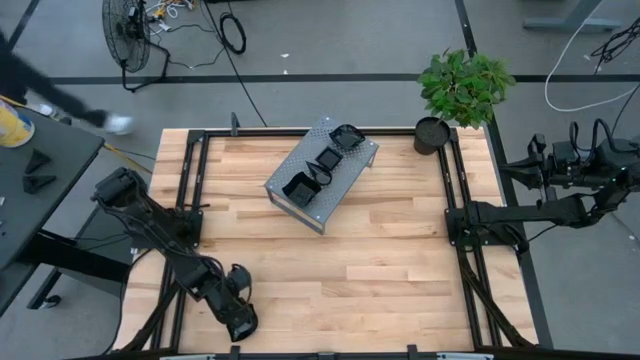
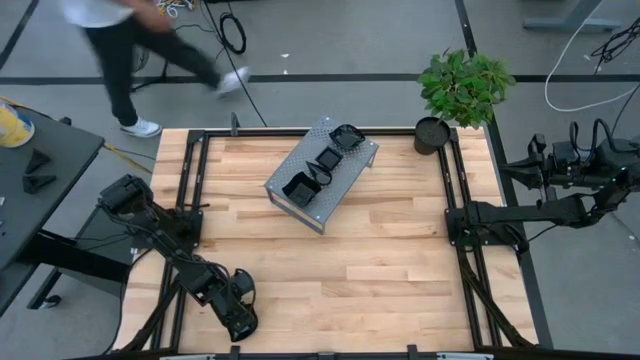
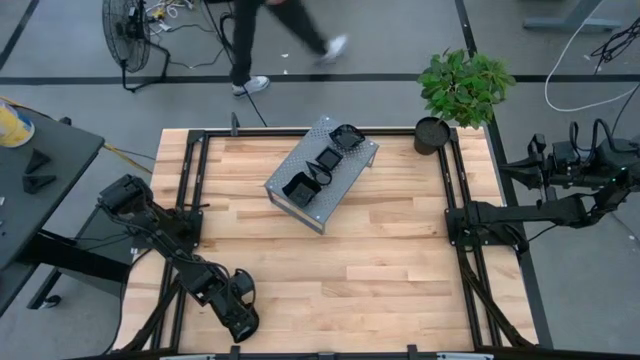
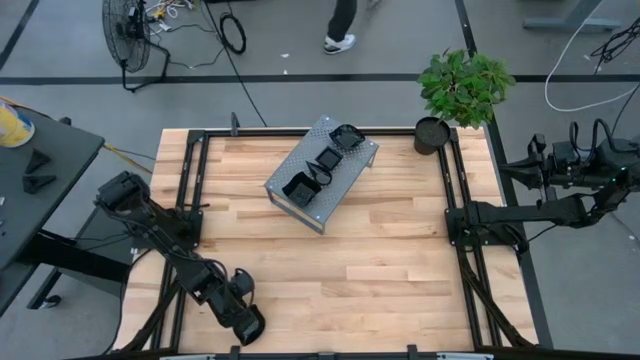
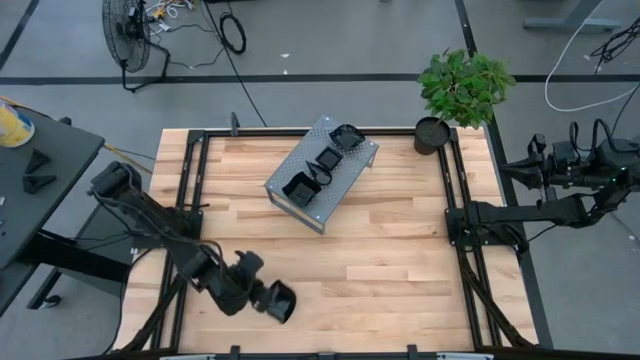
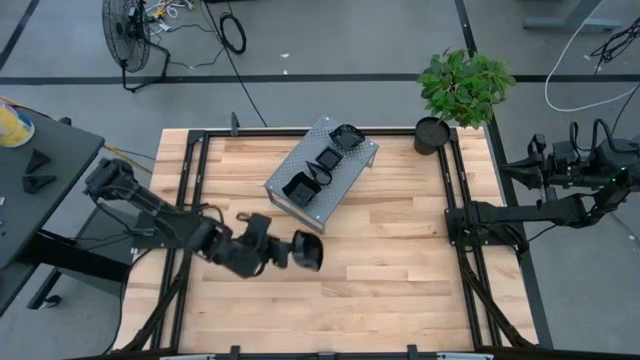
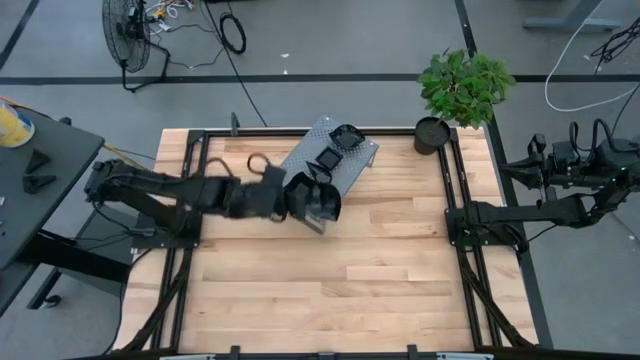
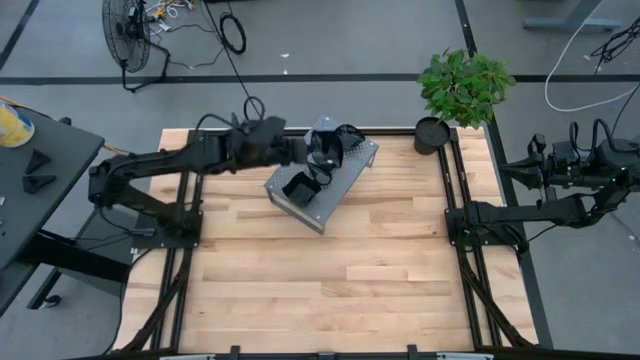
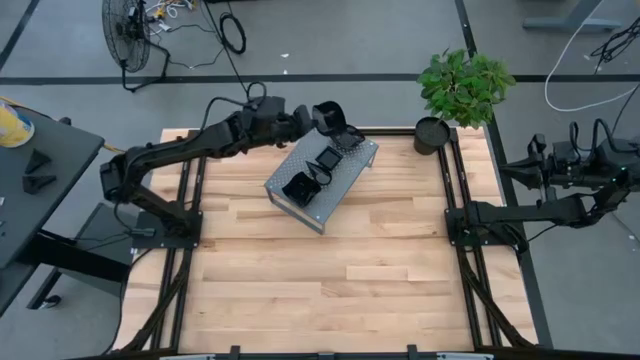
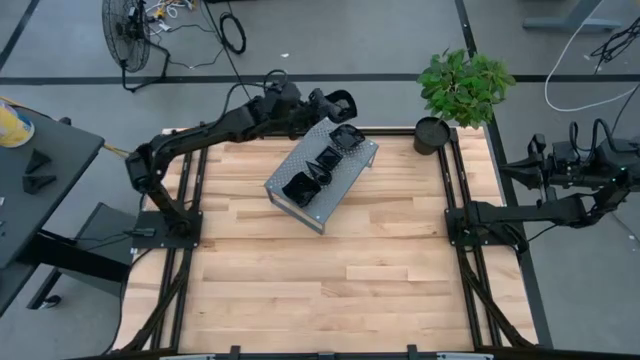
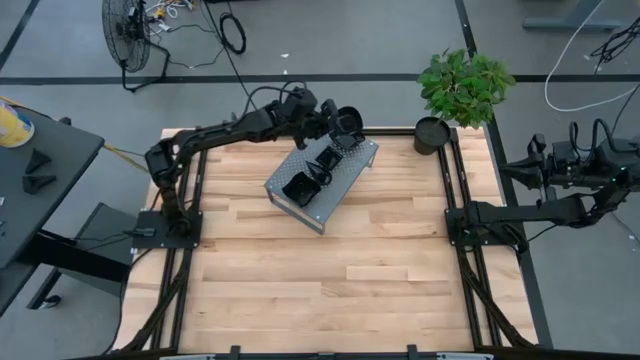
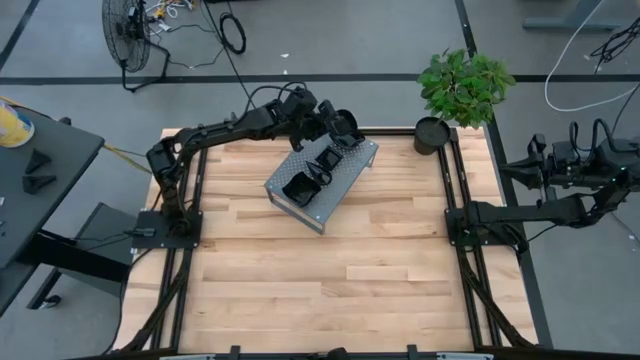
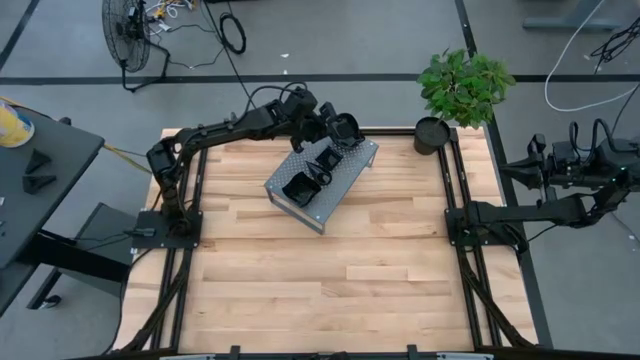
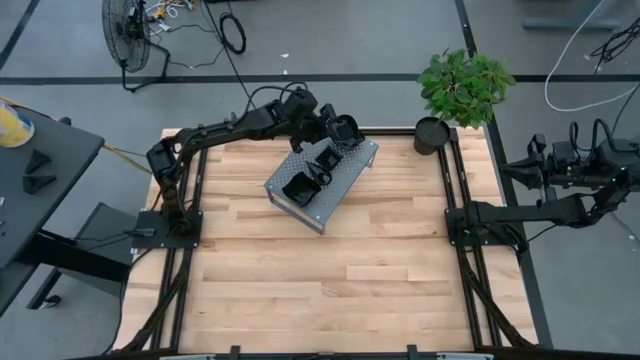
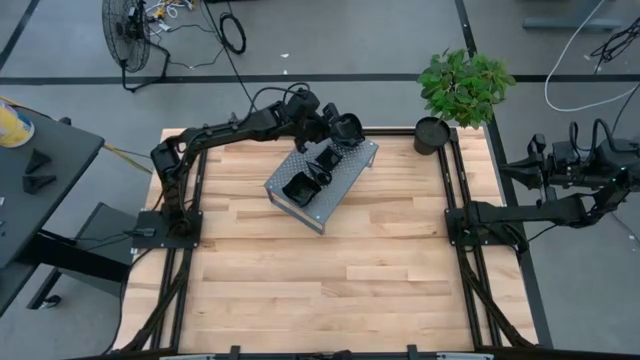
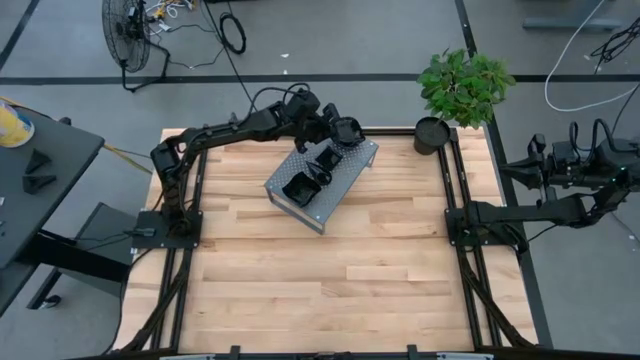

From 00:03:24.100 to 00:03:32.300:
Task: Pick & Place Mini shaped plates
Stack the black leaf shaped plate on top of the black leaf shaped plate on the shelf

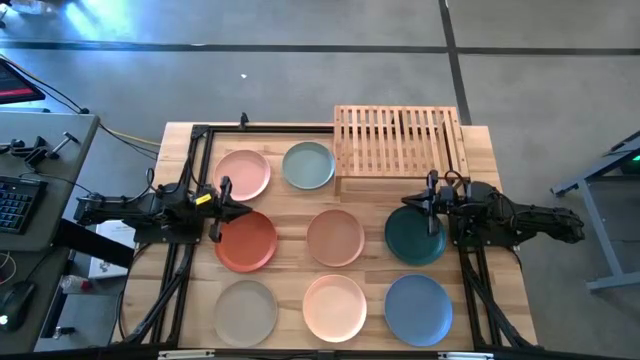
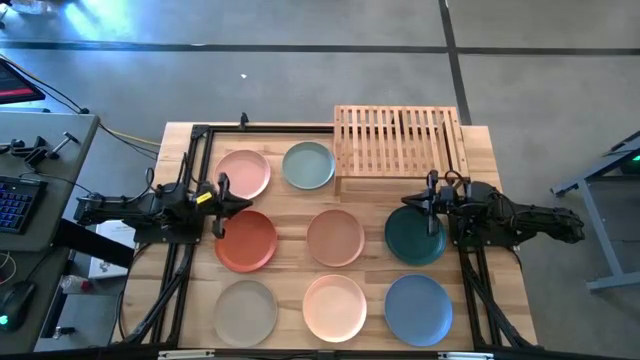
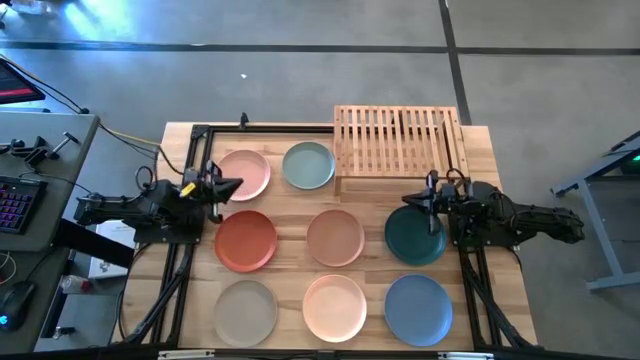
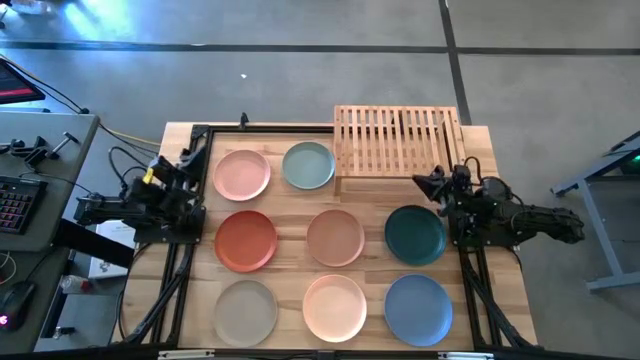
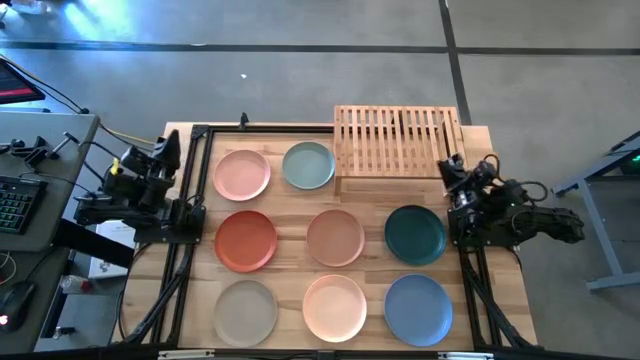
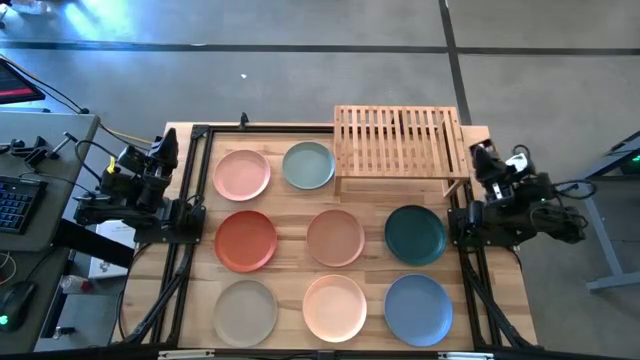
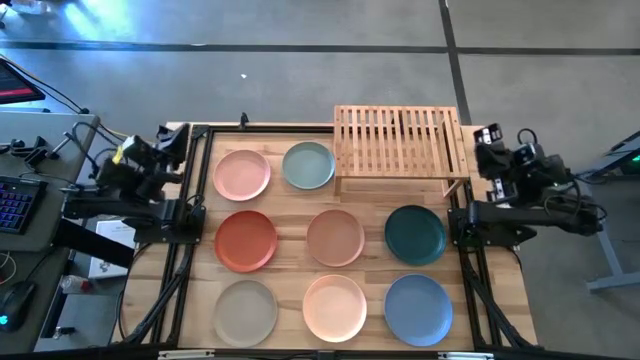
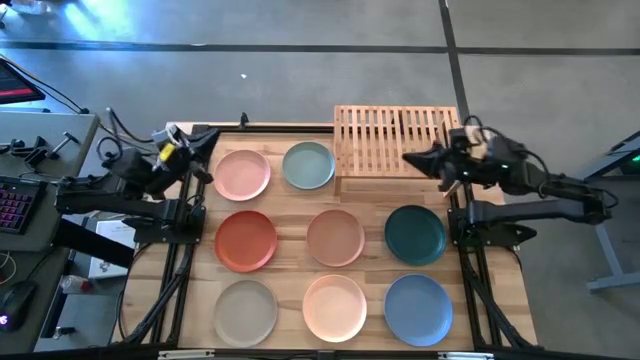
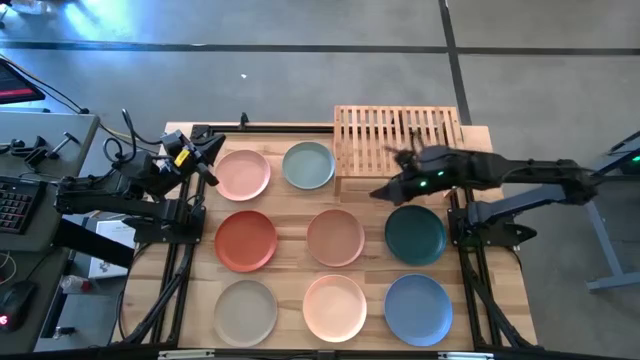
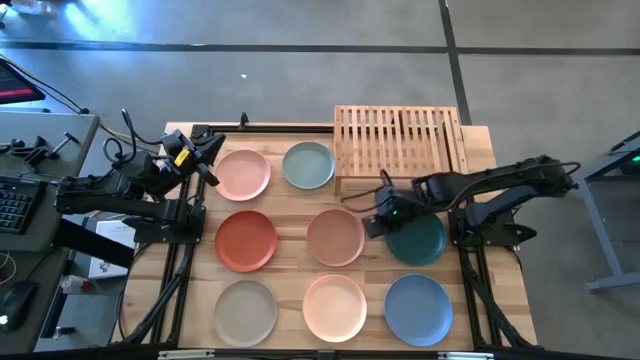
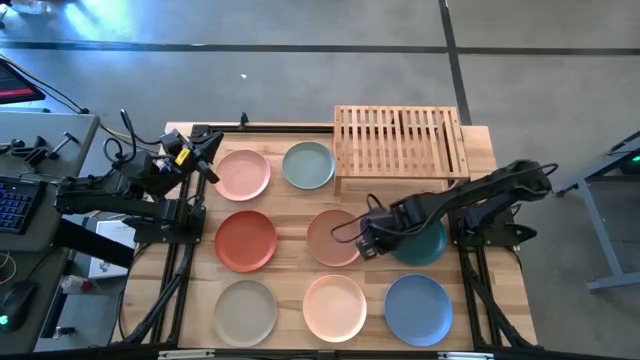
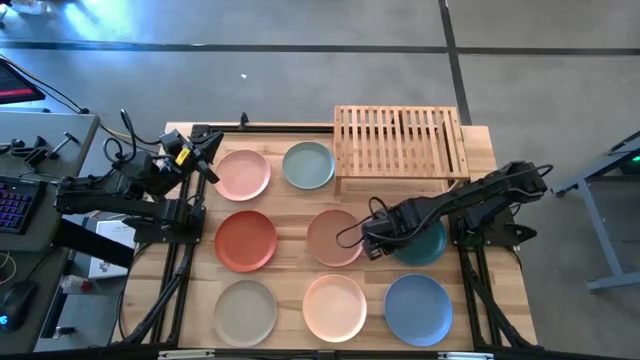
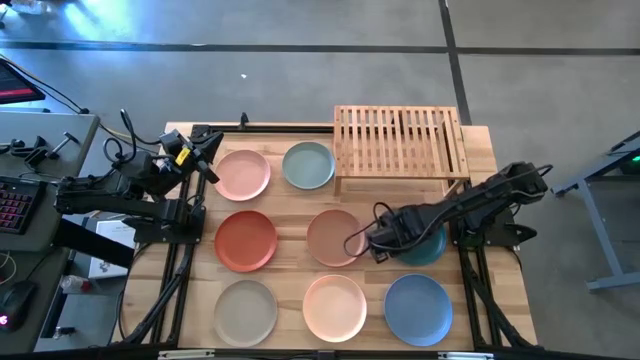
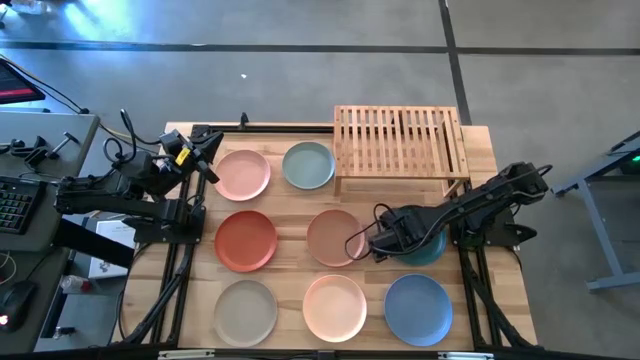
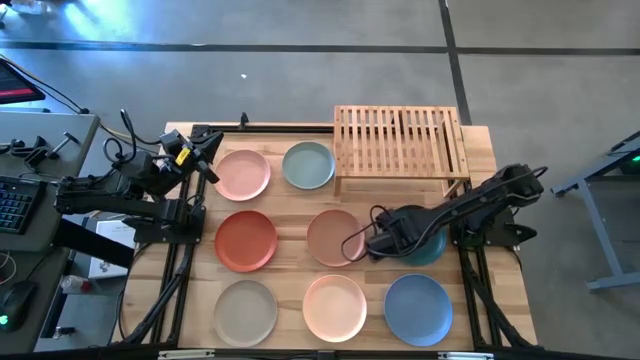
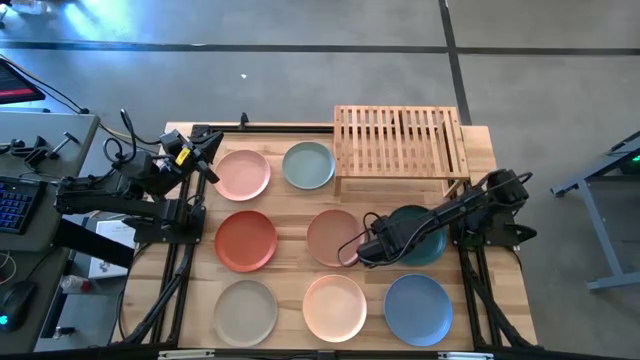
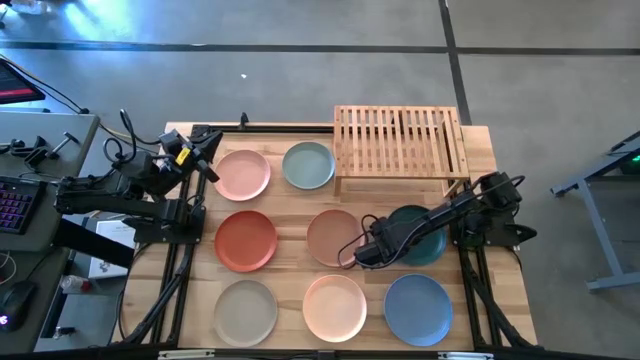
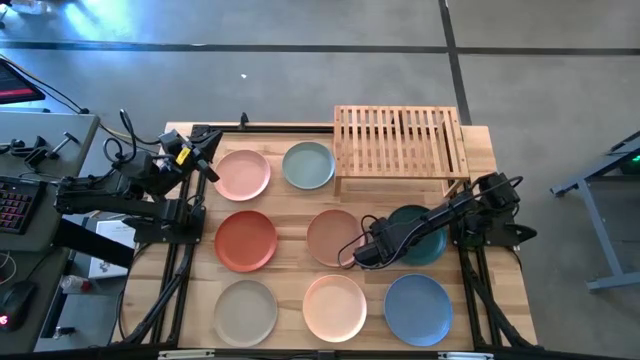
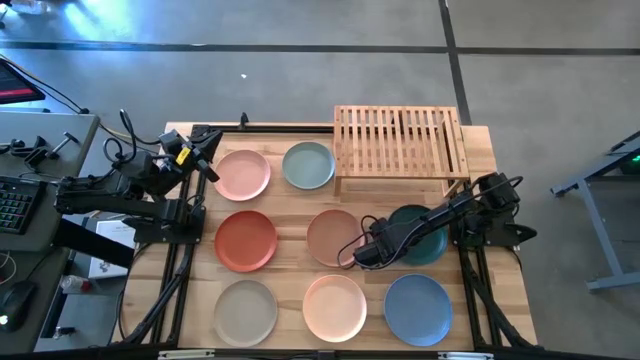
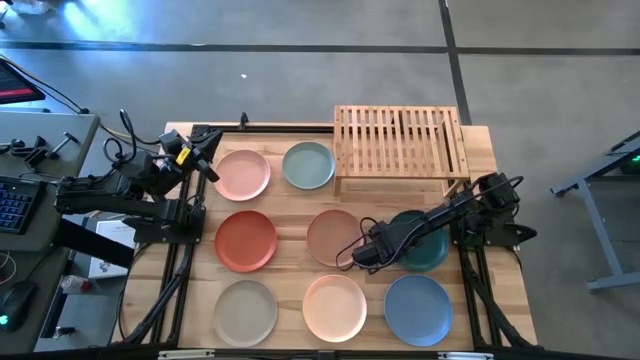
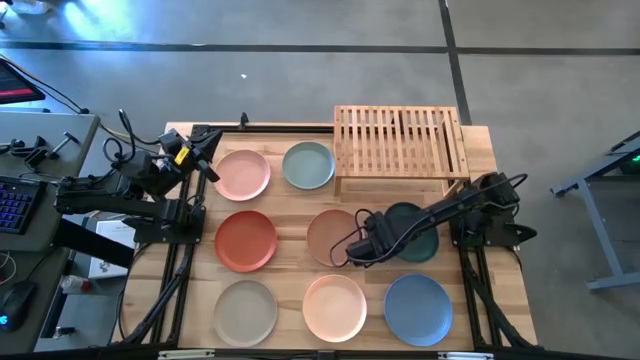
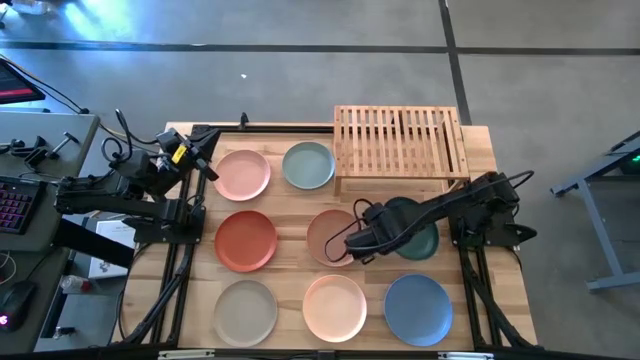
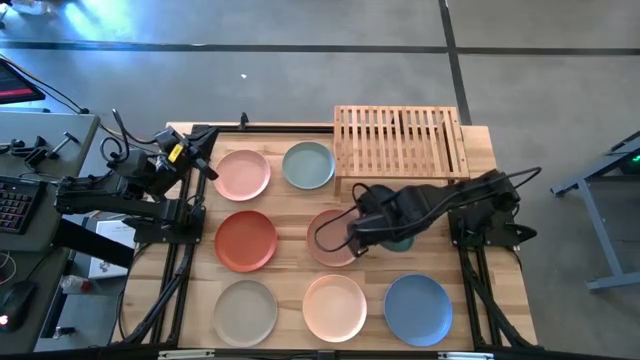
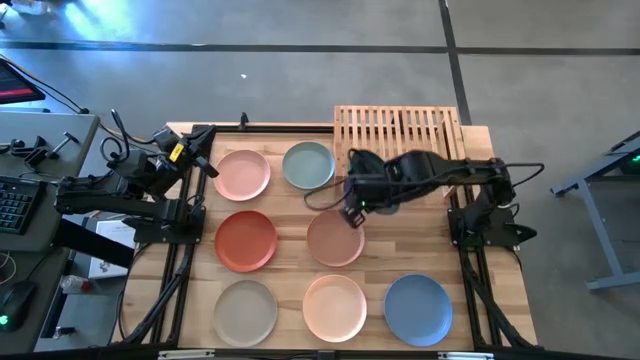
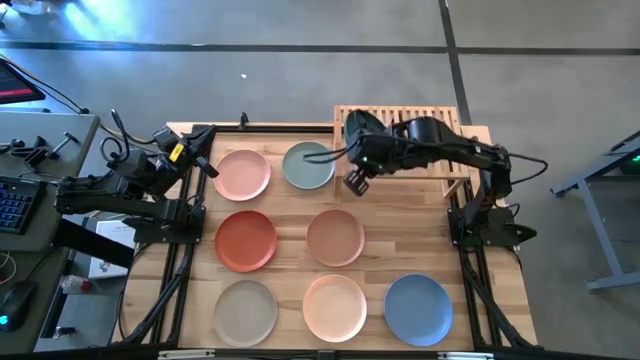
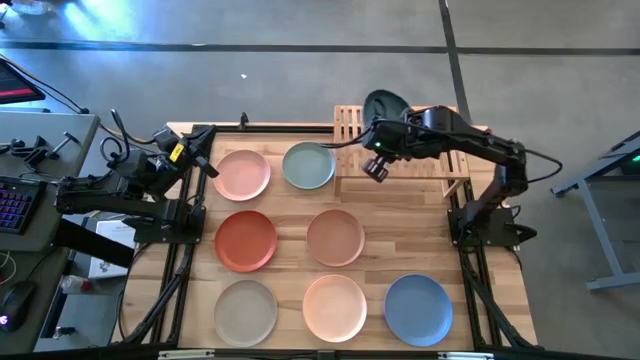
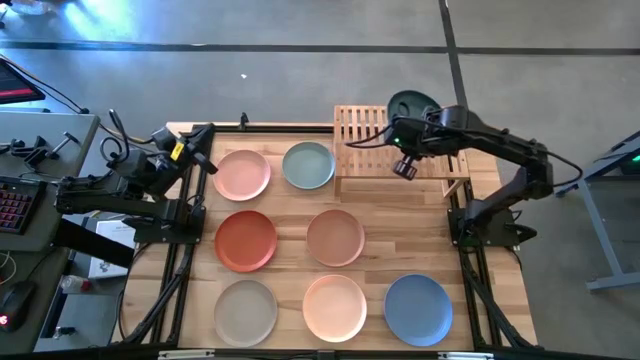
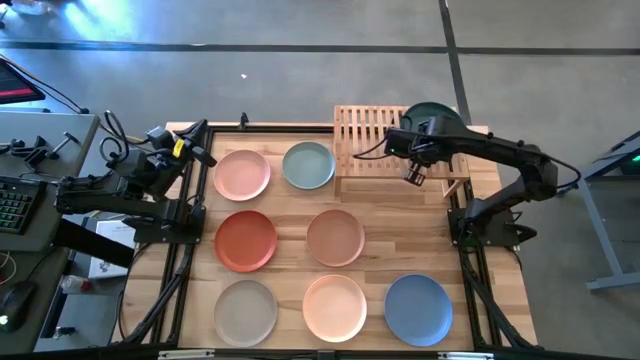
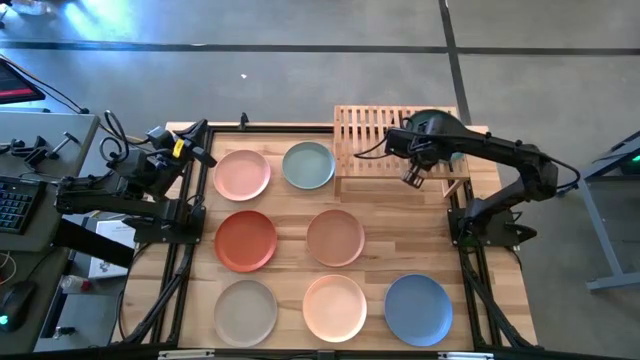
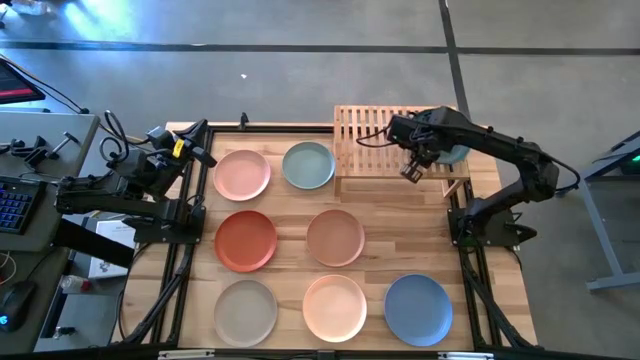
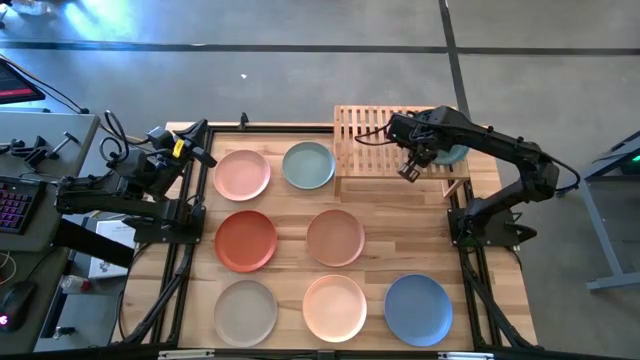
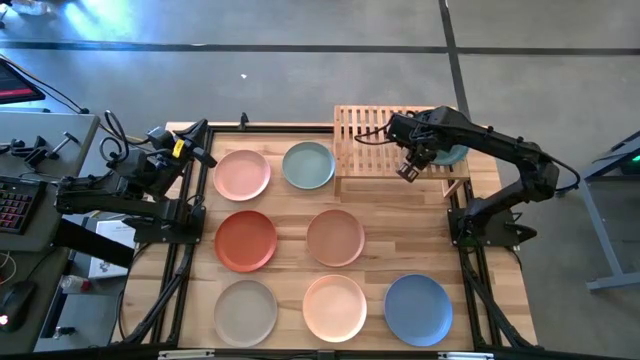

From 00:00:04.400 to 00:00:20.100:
Task: Place and stack plates onto a shelf
Put the dark blue plate on the shelf
